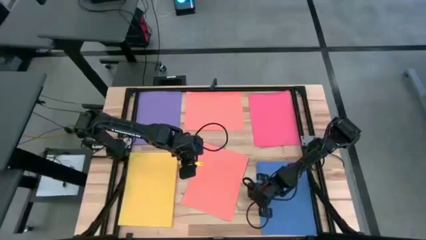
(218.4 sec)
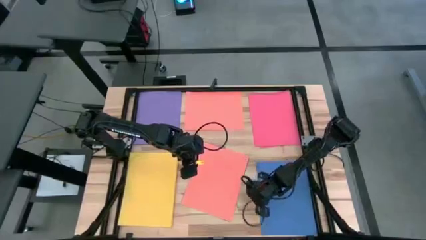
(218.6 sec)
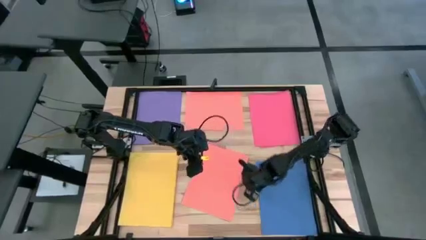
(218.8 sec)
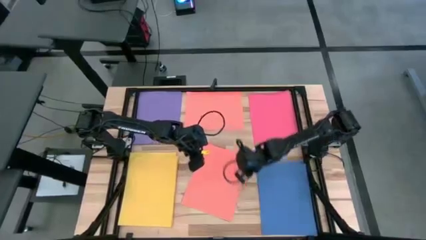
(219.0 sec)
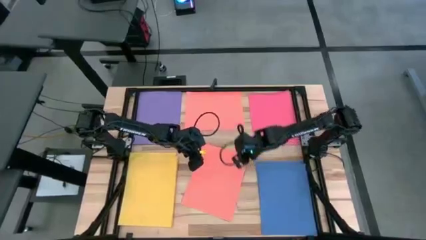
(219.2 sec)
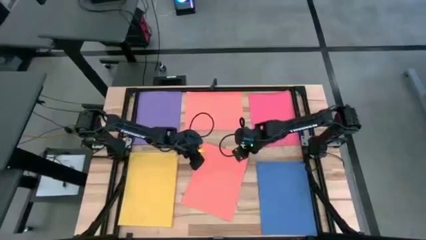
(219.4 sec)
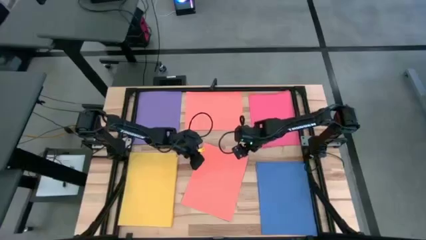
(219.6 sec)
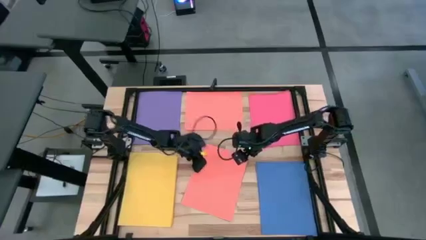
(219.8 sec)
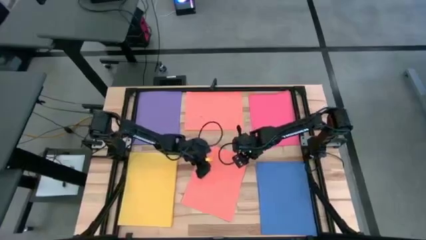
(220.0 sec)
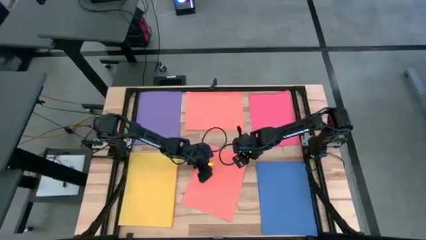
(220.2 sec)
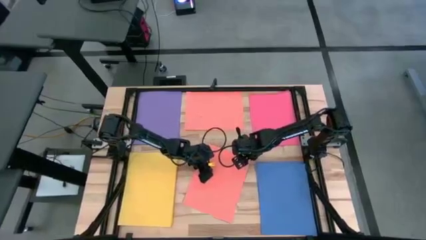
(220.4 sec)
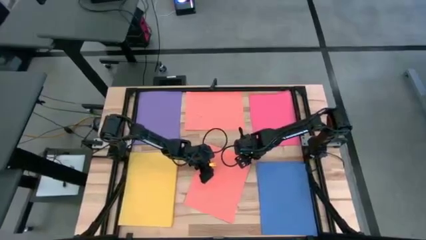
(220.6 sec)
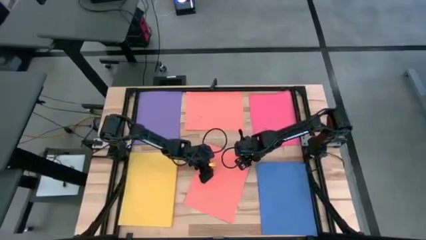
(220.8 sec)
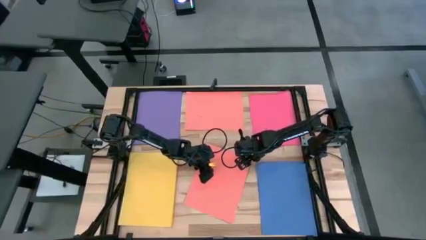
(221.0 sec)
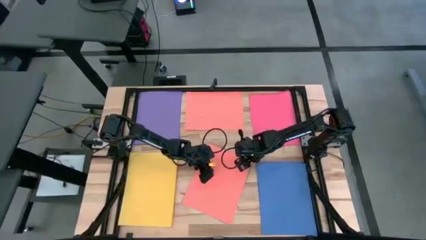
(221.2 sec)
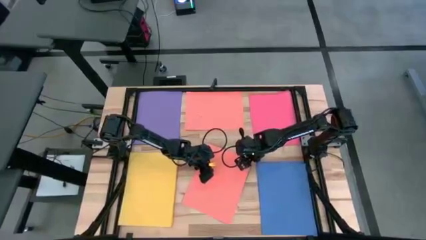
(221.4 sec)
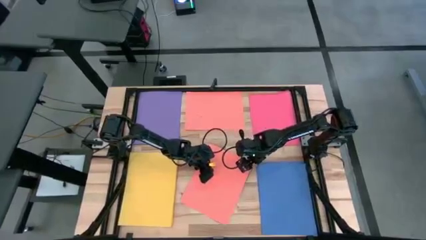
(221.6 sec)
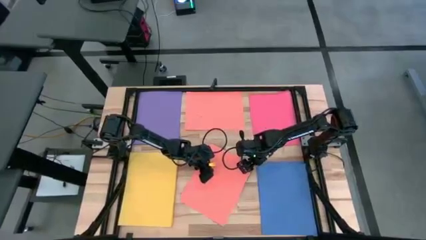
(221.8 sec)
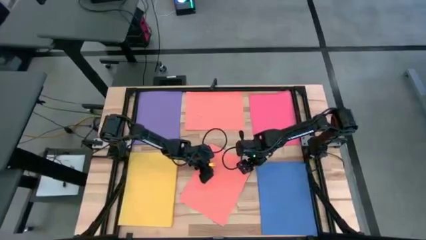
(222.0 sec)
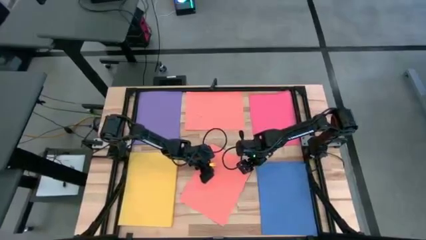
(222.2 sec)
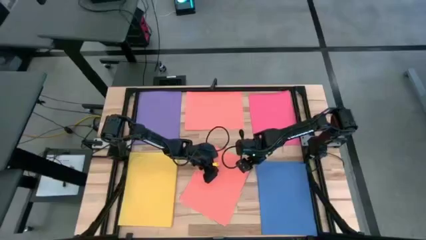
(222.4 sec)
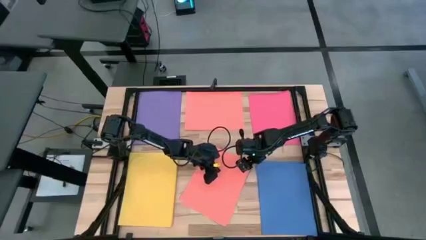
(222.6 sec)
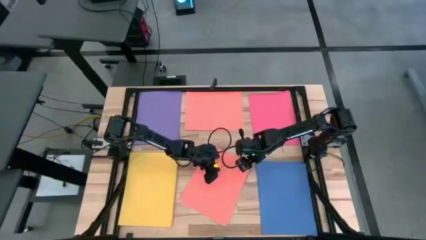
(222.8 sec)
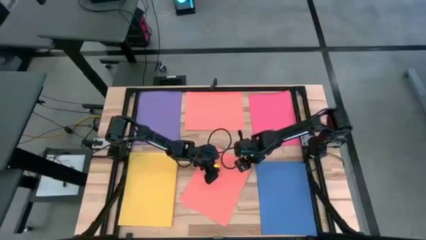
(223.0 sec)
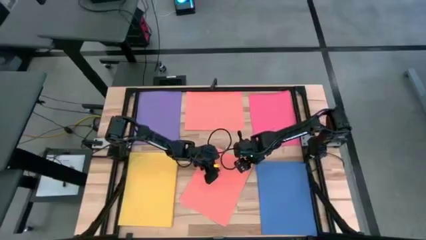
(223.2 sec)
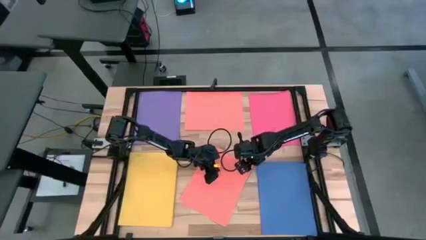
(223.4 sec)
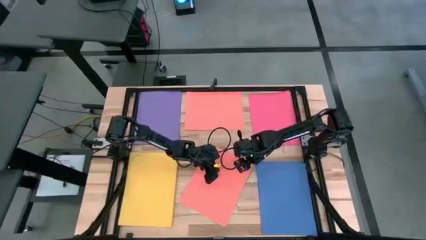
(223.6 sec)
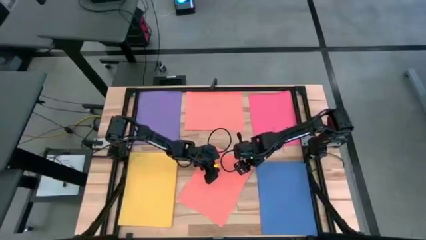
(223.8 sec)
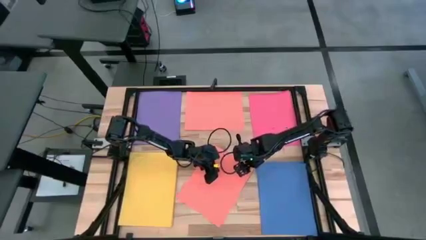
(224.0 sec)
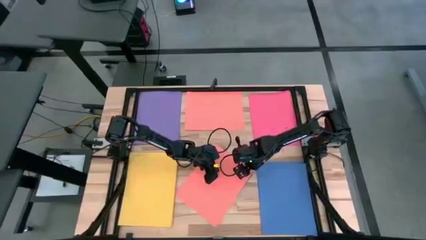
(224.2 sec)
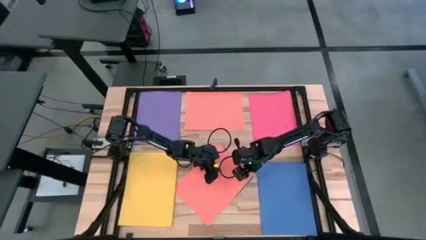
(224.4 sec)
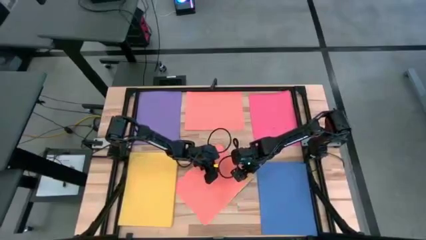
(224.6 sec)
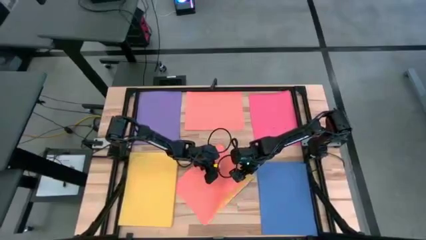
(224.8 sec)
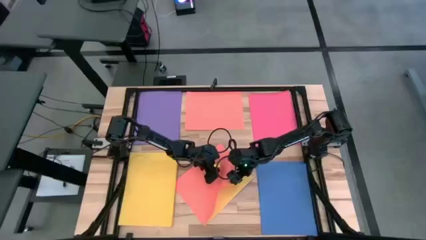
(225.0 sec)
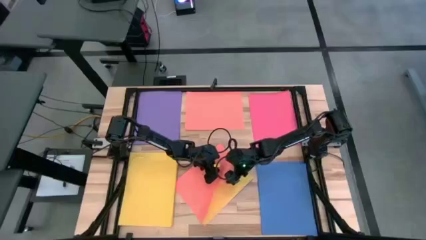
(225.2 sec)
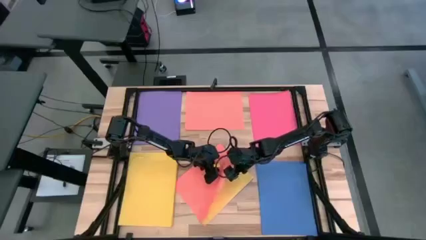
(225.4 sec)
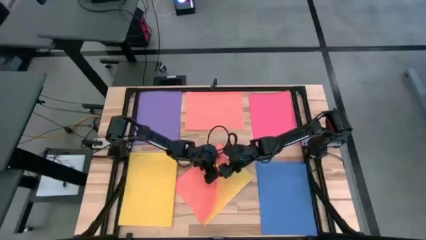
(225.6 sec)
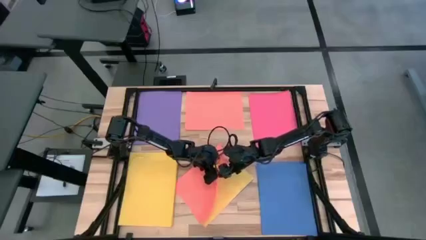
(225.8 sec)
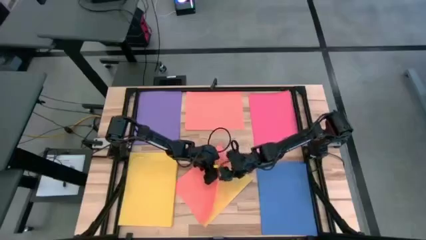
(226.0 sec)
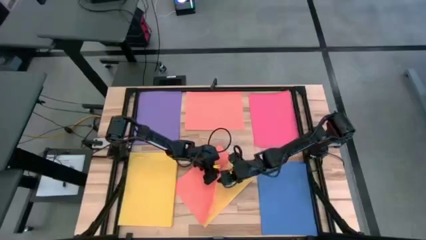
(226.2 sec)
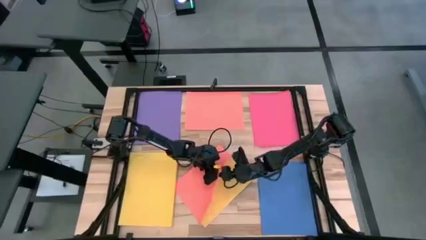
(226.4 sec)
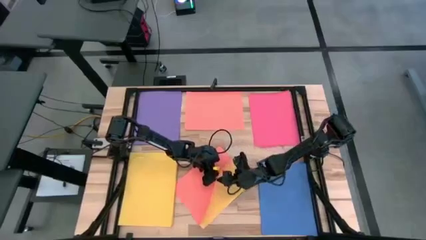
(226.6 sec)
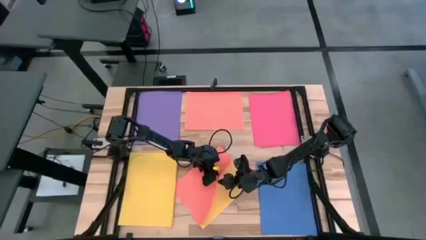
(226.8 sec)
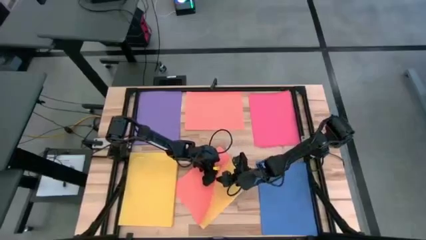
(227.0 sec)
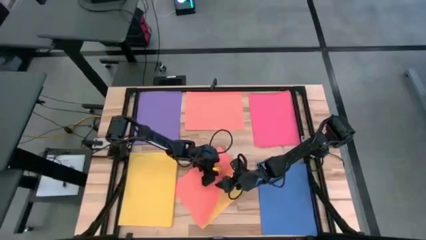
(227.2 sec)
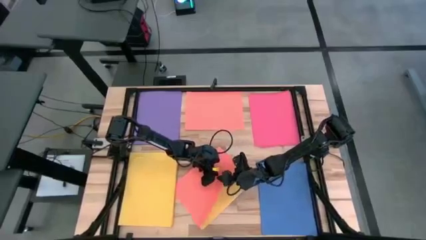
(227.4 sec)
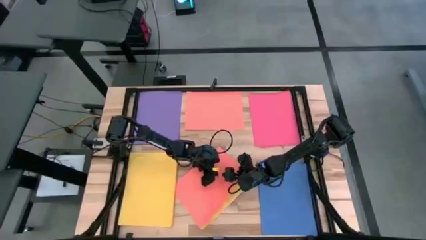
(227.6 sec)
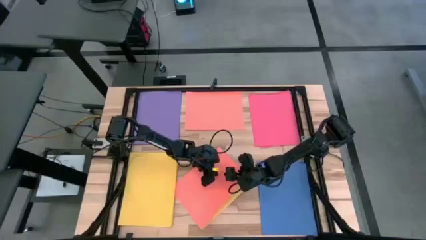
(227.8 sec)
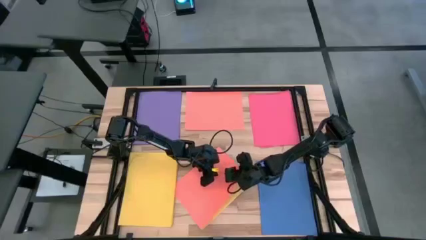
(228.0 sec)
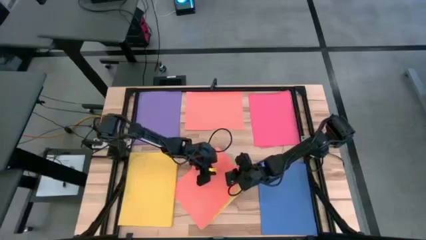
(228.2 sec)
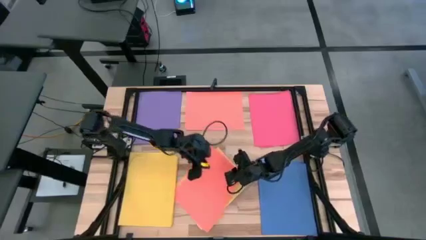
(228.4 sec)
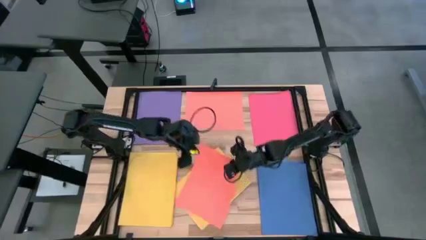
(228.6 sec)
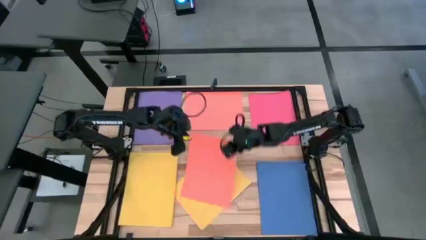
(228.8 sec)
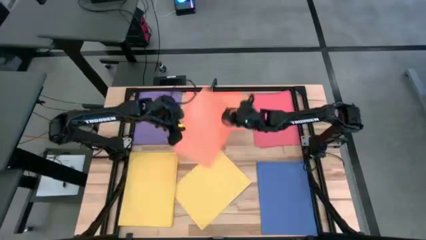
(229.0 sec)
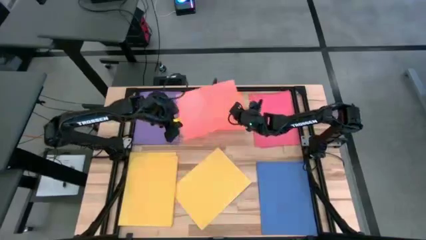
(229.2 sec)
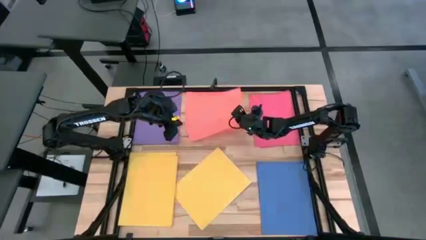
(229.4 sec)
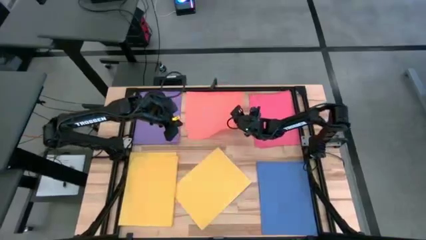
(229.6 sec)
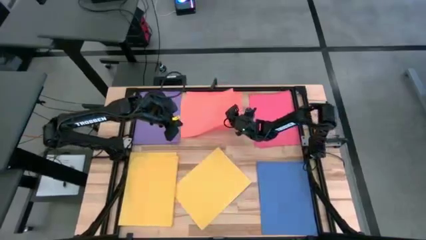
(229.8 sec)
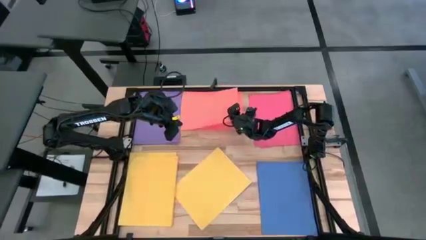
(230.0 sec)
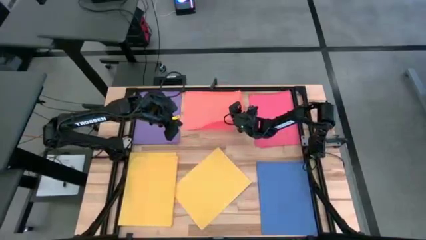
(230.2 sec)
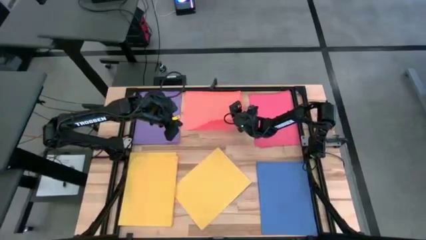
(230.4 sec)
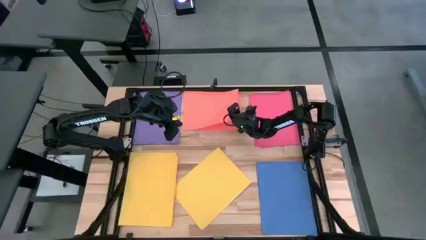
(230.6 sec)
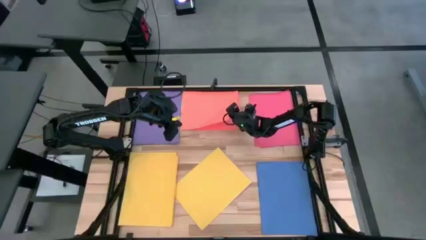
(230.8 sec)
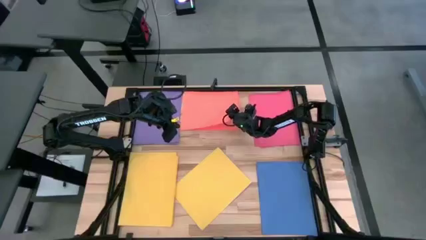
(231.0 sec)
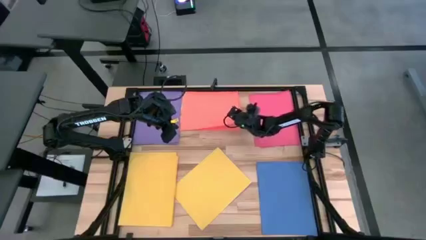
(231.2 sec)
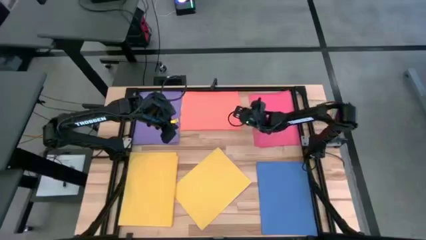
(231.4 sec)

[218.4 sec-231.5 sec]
Task: Organize paper
Stack the orange paper on top of the other orange paper

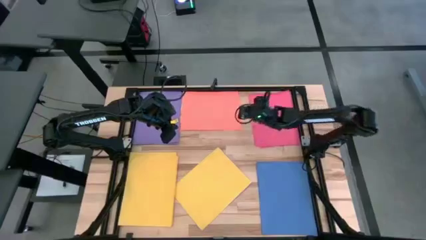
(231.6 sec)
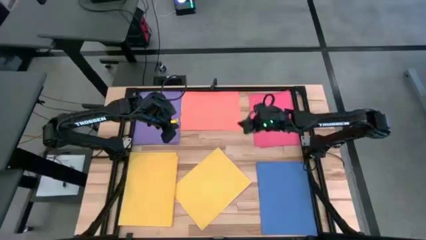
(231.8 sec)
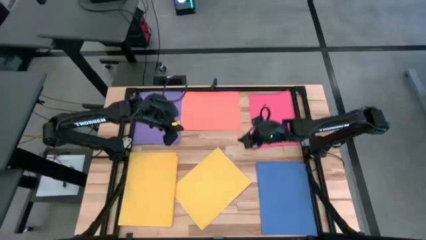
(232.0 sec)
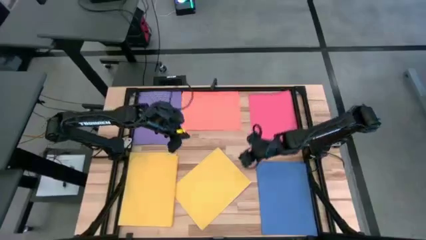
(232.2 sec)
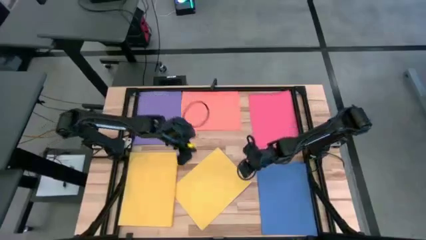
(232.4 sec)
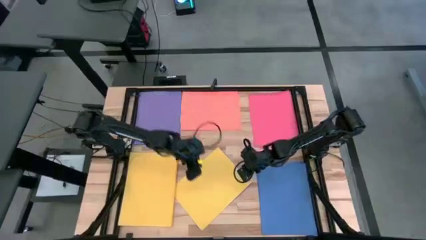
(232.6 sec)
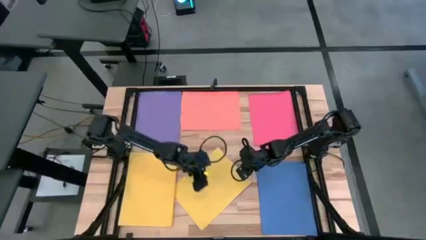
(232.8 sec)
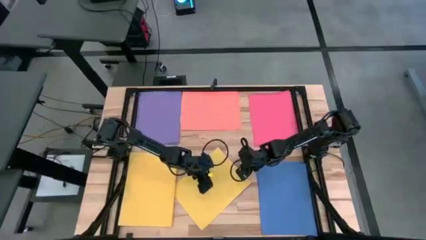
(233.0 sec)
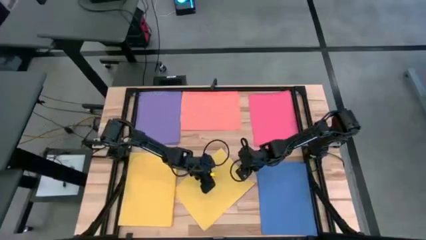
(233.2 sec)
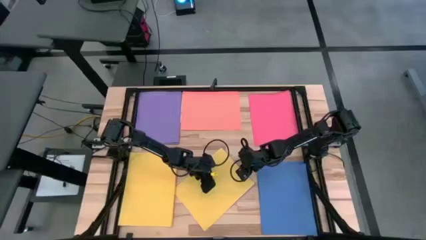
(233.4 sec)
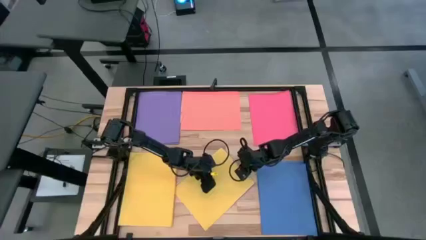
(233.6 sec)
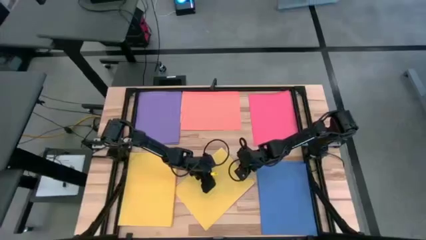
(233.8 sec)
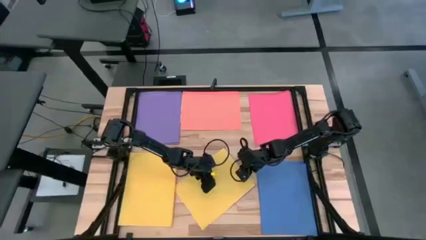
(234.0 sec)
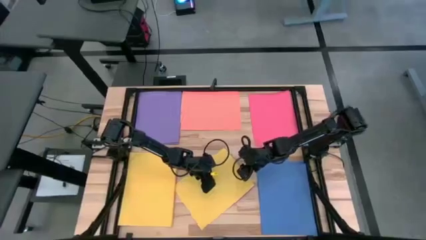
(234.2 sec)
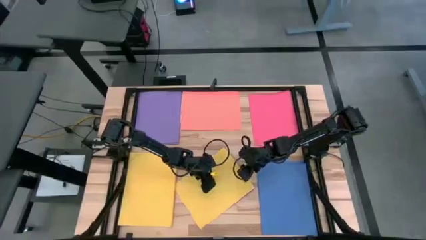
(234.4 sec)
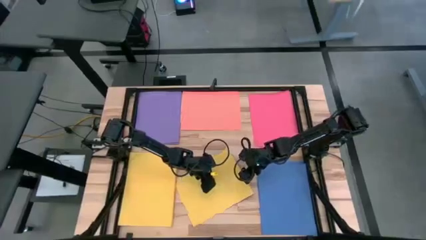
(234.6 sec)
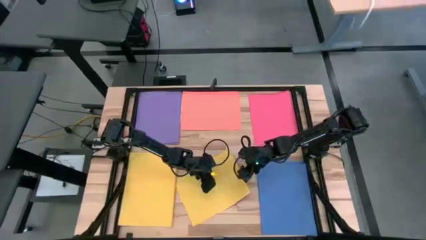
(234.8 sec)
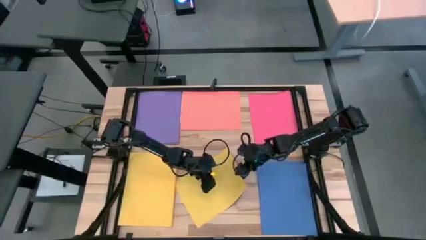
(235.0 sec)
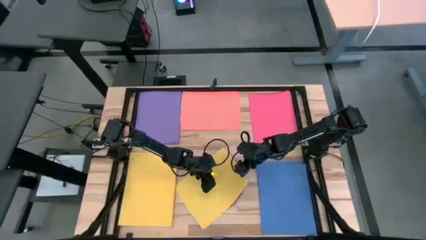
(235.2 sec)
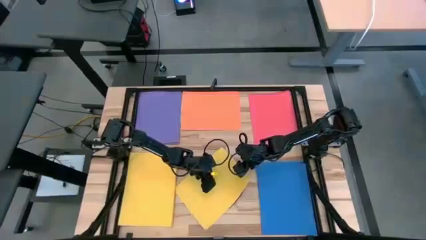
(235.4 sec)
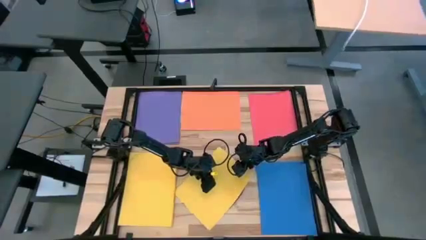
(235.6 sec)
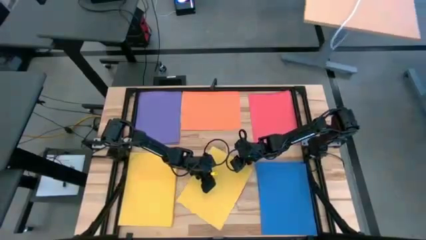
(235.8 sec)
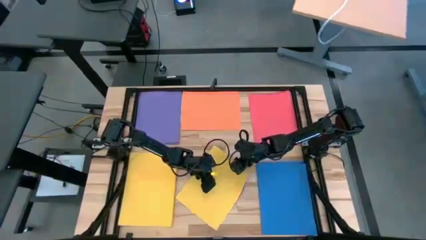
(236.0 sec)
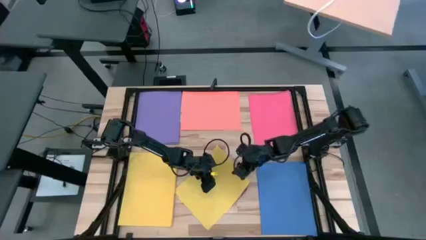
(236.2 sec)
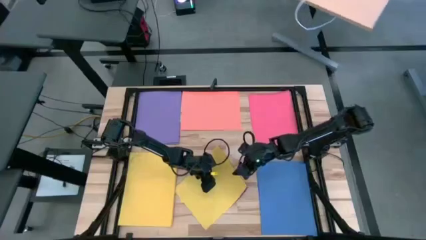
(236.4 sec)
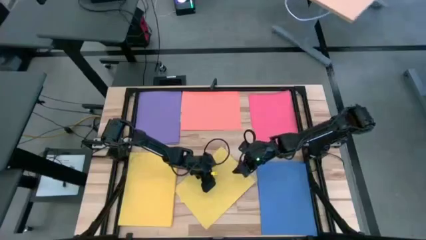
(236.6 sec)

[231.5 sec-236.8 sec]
Stack the yellow paper on top of the other yellow paper
